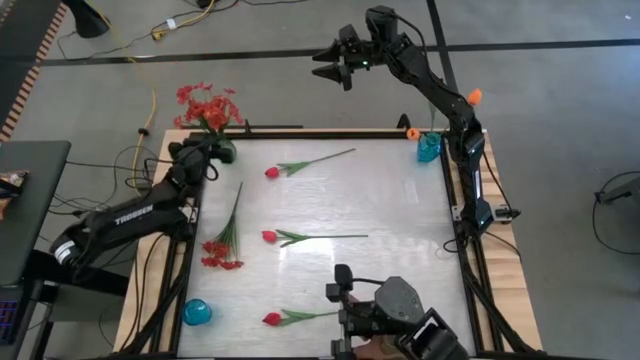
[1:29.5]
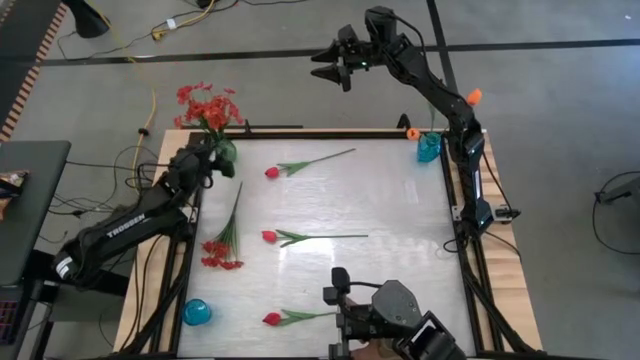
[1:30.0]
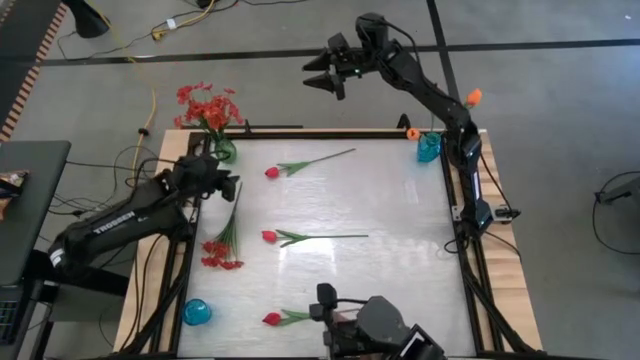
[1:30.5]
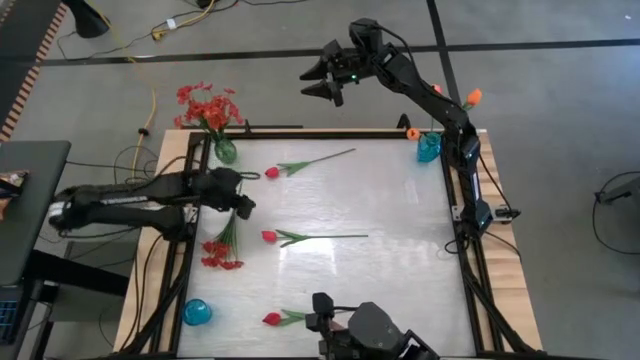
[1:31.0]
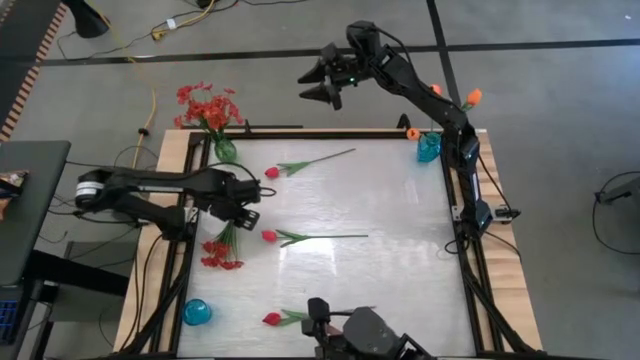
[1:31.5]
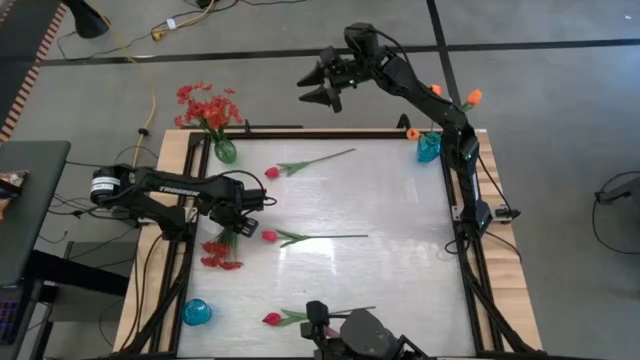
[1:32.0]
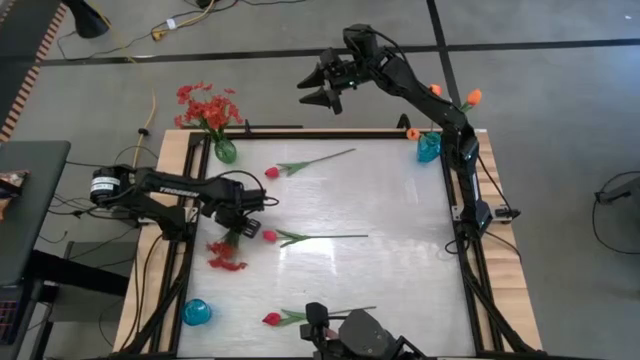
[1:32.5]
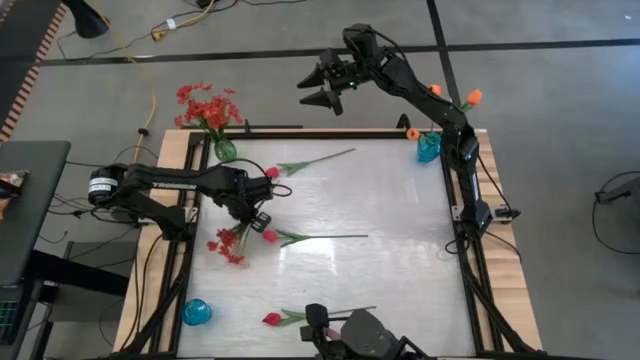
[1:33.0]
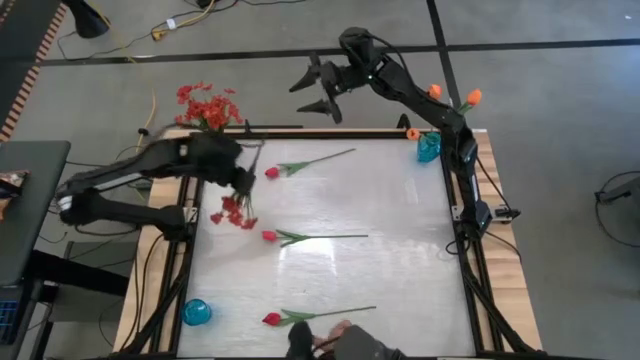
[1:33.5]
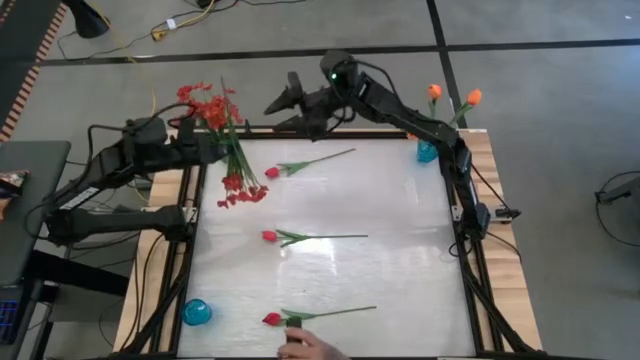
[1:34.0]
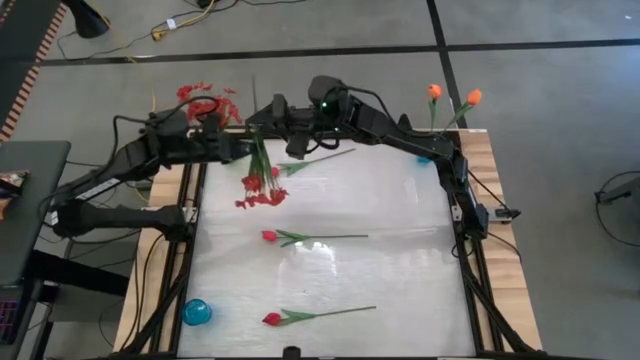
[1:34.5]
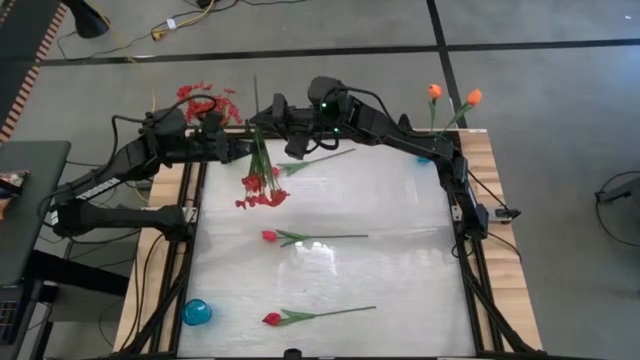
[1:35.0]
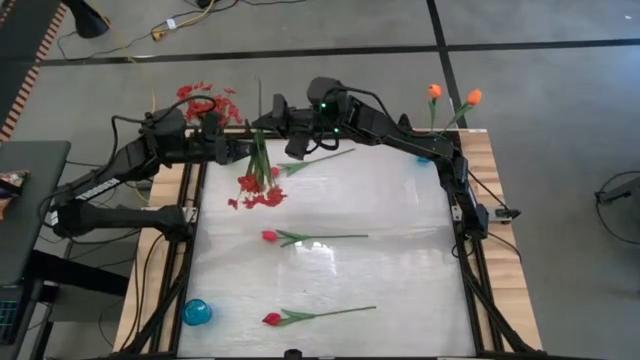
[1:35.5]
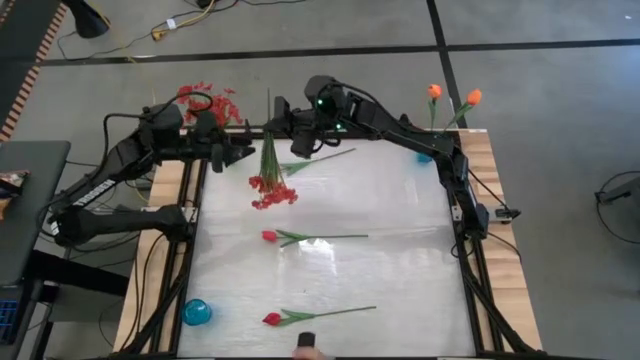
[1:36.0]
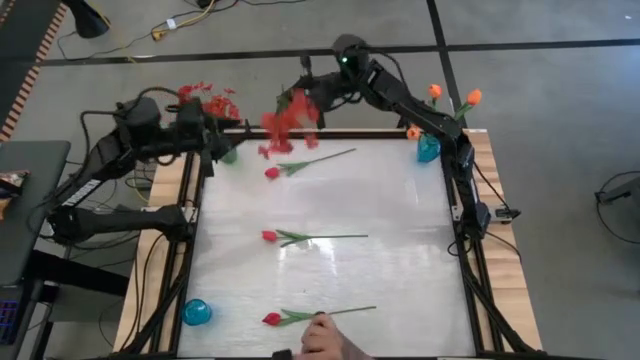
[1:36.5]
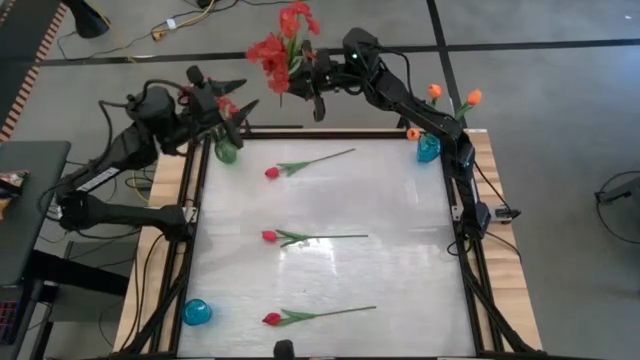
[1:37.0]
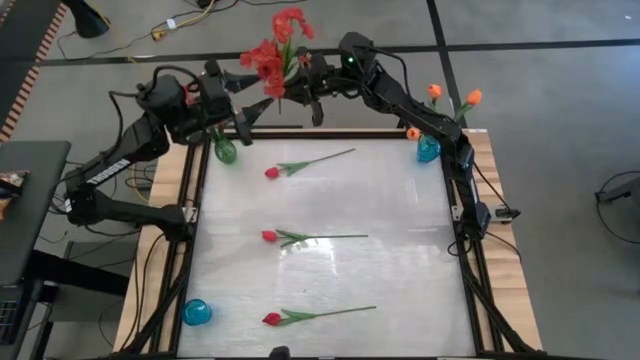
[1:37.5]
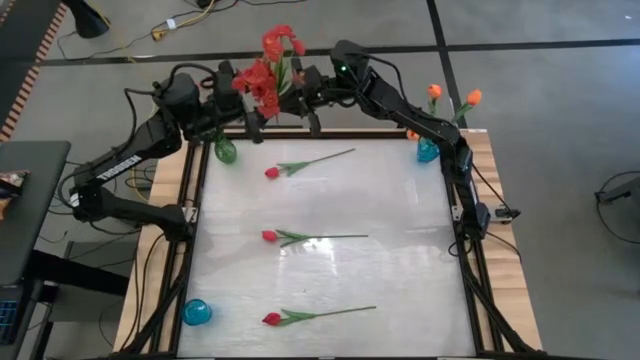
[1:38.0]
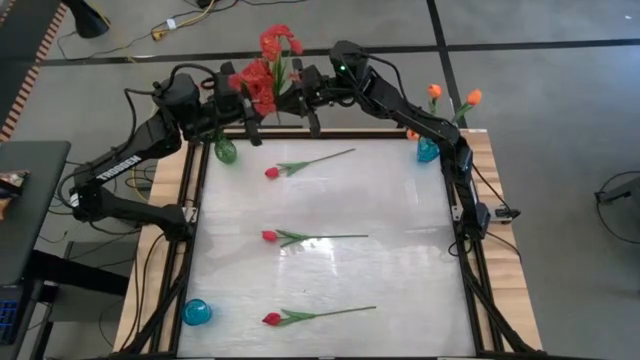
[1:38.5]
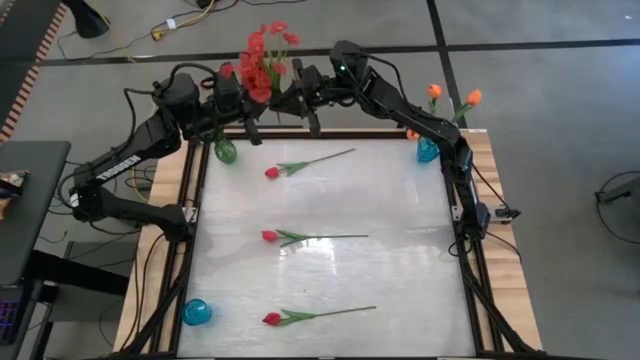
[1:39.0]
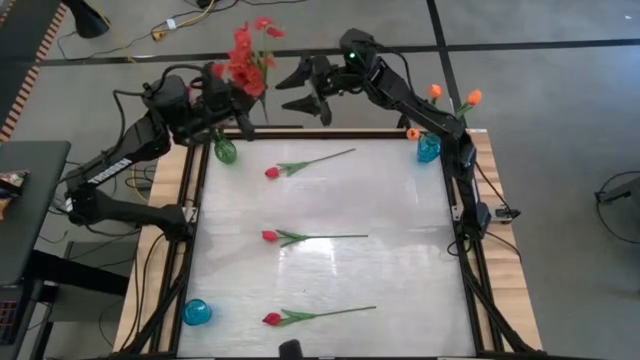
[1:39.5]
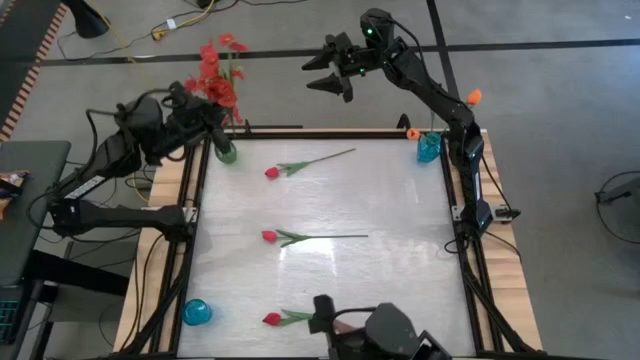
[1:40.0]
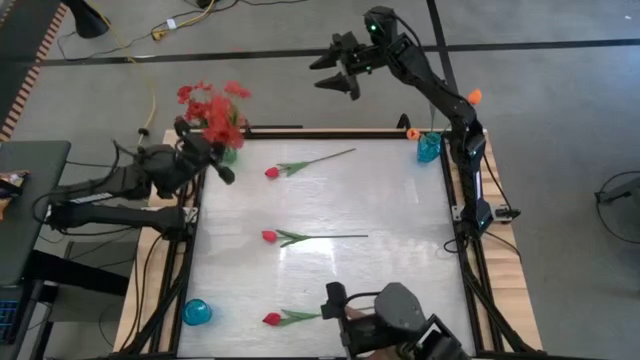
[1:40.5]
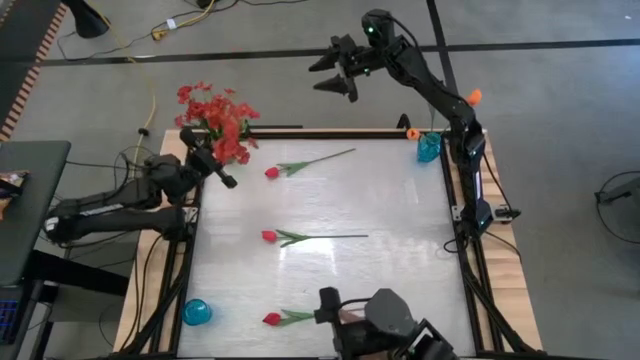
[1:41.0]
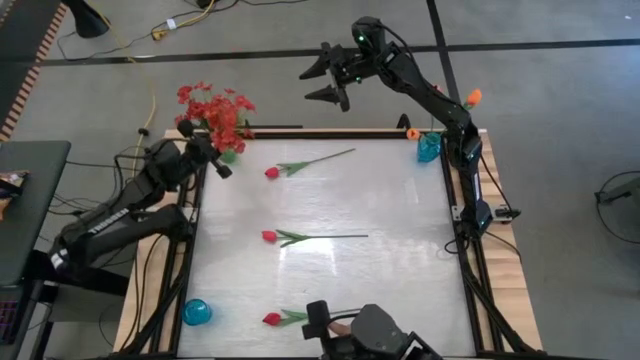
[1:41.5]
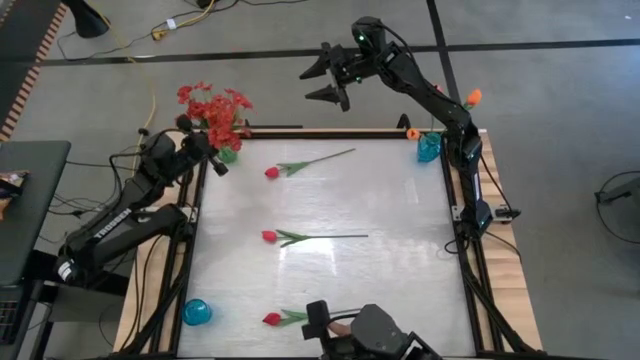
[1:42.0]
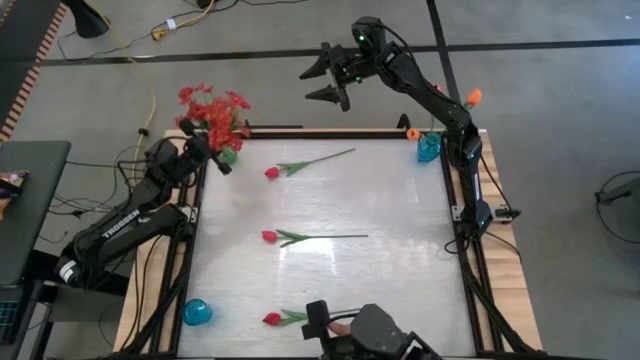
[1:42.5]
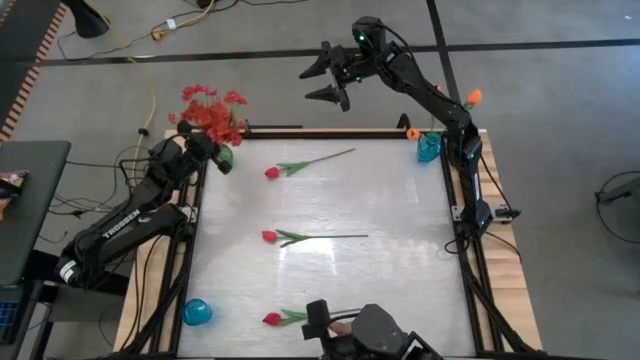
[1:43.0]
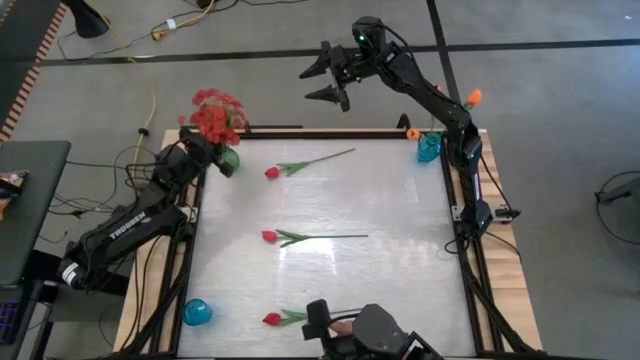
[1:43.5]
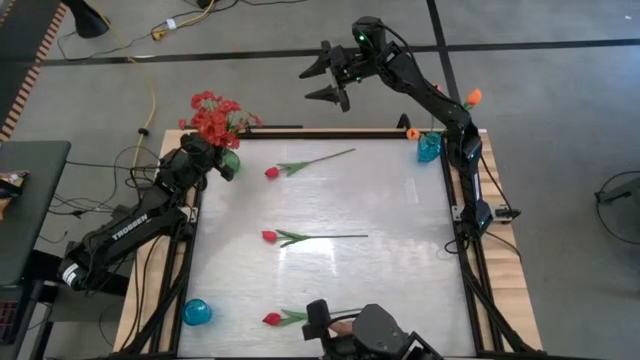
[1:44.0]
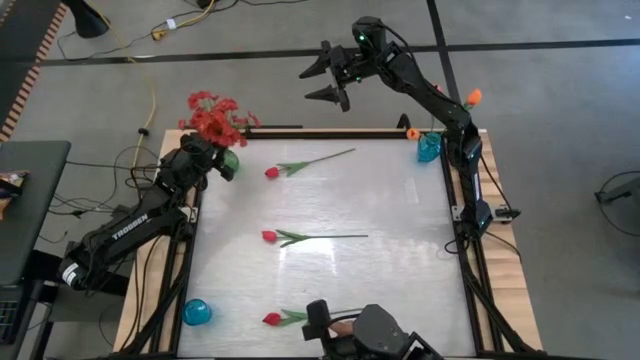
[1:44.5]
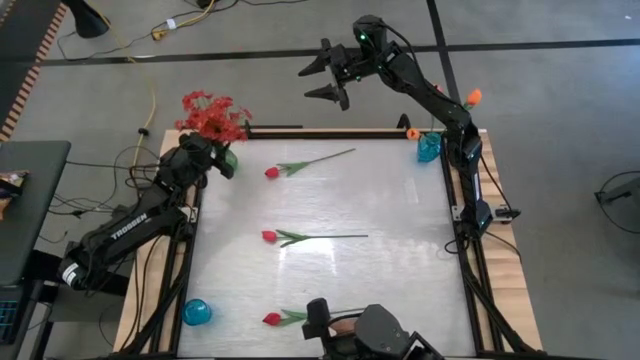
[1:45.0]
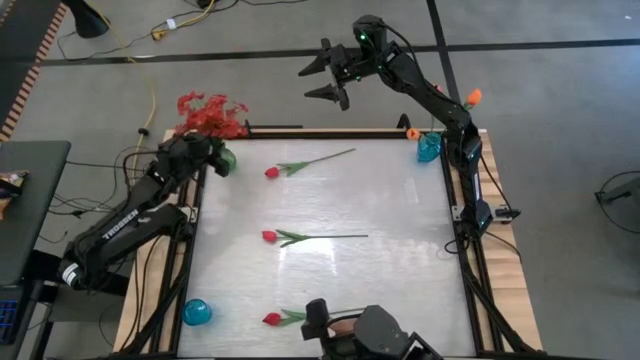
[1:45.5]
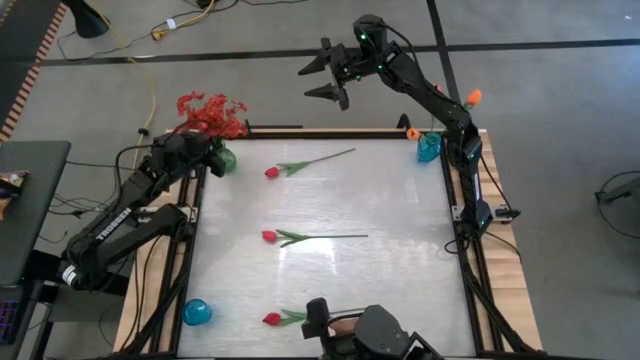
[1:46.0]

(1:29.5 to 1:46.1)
Task: Sort flowers into vase by color
Put the red flowers into the green vase

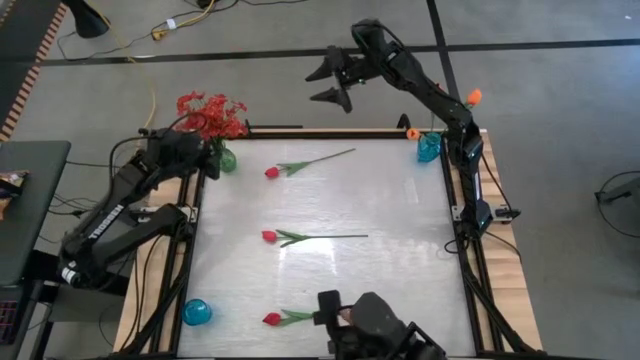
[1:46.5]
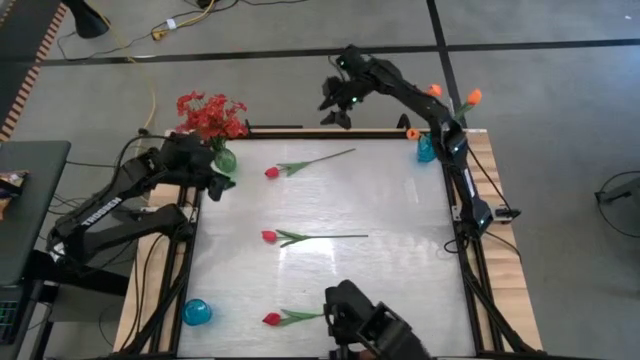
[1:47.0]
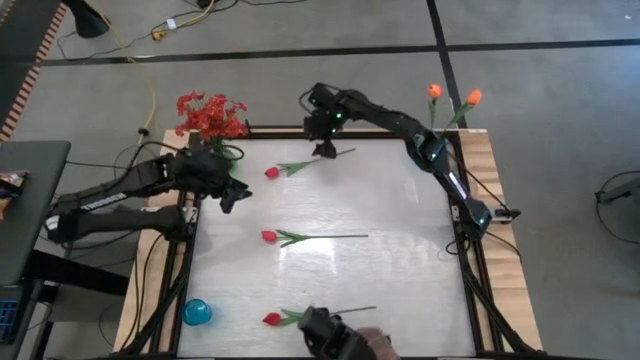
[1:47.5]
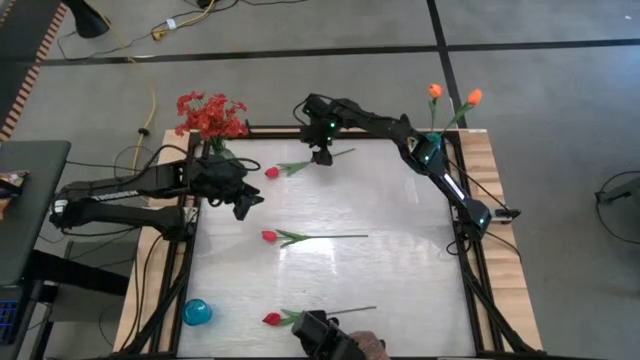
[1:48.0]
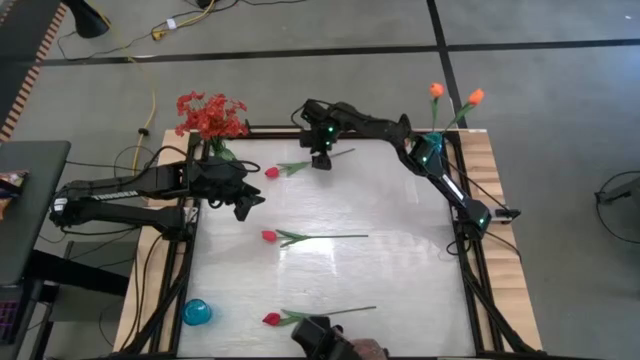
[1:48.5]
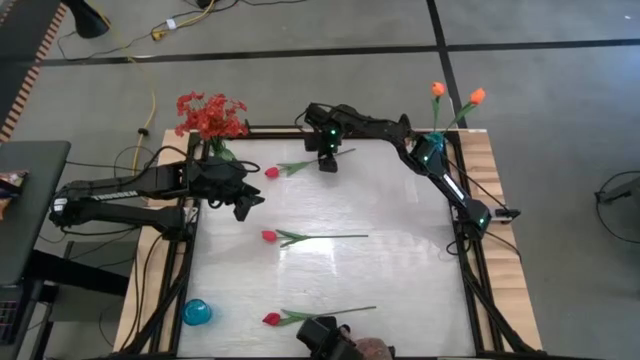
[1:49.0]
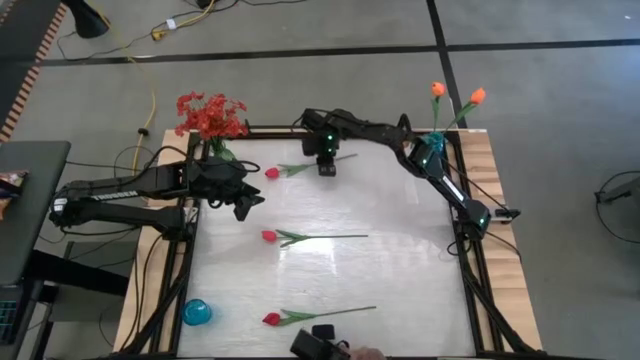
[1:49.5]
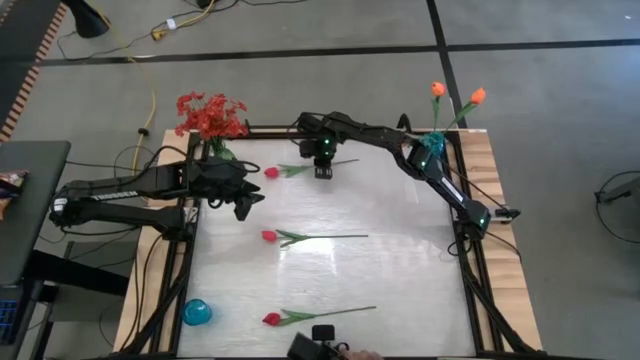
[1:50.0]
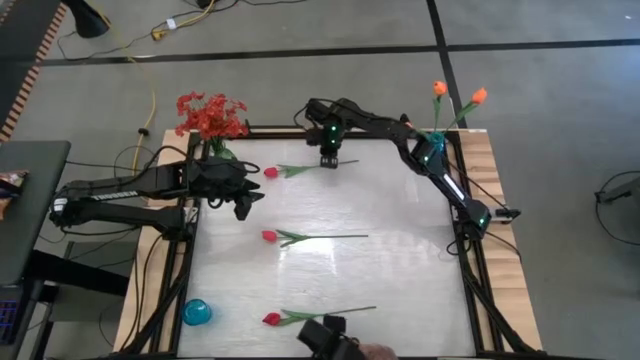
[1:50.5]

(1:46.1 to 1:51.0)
Put the top center pink tulip into the bottom blue vase
